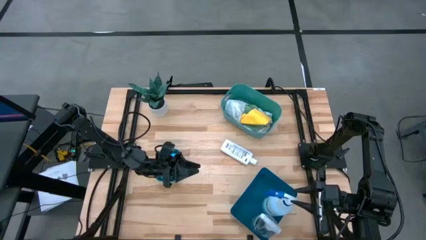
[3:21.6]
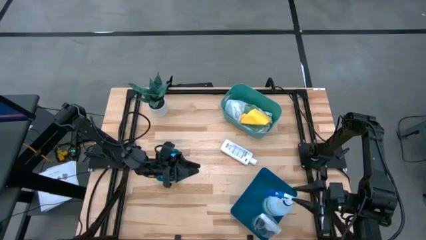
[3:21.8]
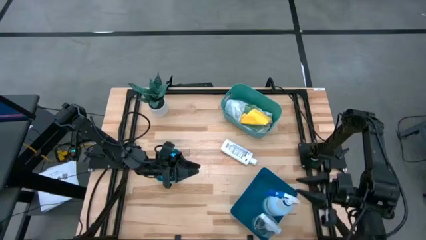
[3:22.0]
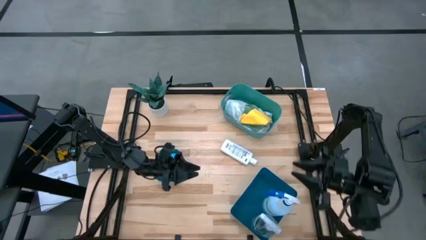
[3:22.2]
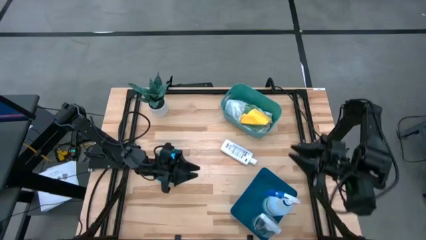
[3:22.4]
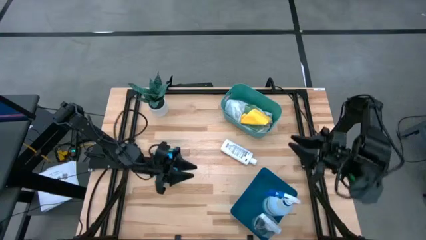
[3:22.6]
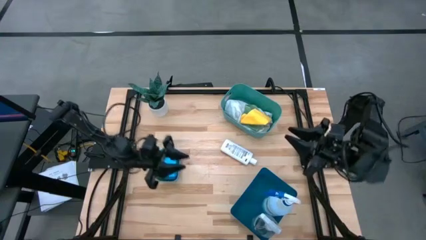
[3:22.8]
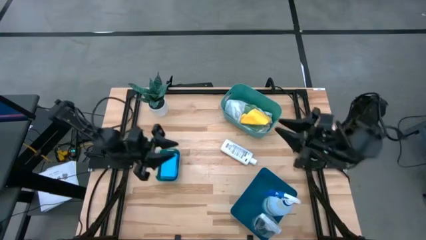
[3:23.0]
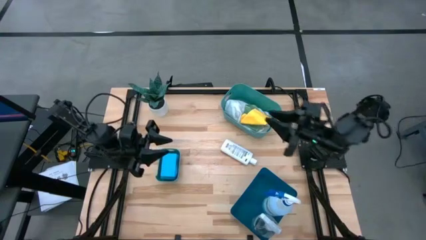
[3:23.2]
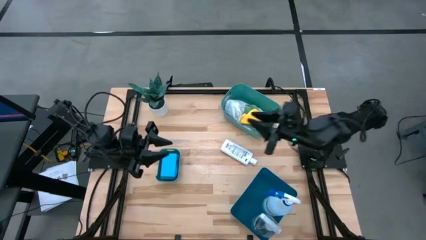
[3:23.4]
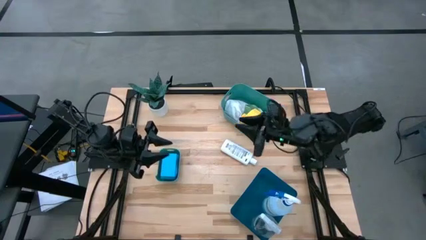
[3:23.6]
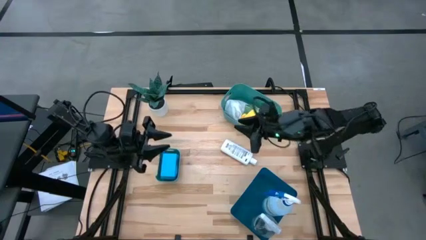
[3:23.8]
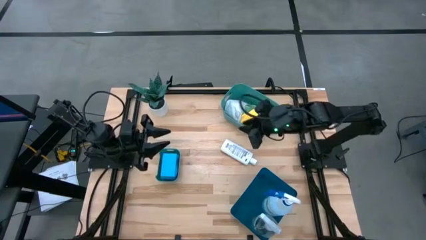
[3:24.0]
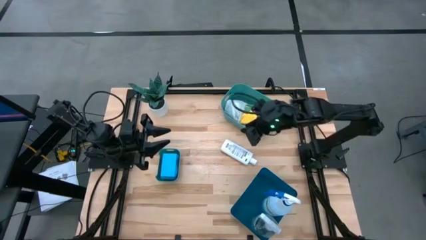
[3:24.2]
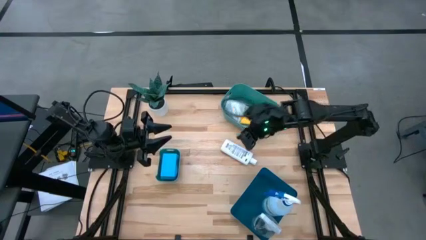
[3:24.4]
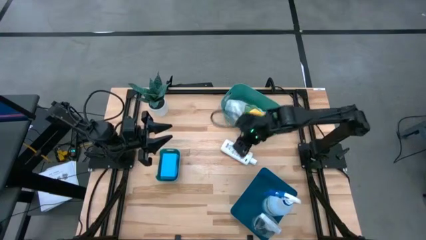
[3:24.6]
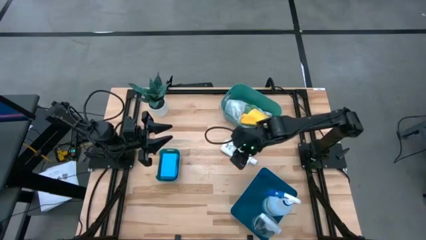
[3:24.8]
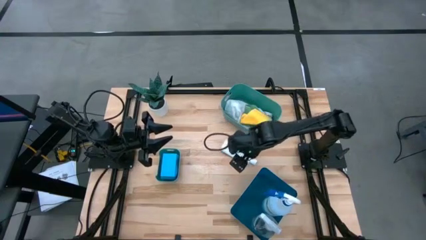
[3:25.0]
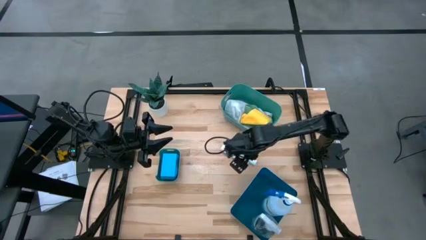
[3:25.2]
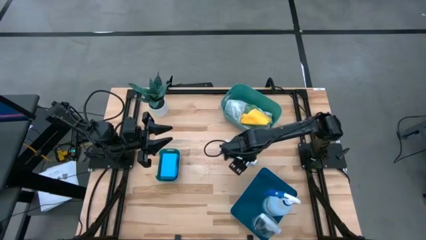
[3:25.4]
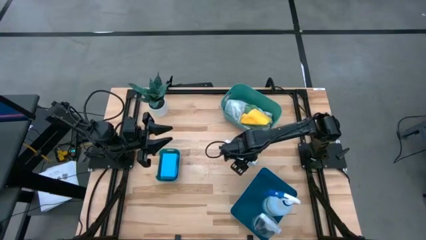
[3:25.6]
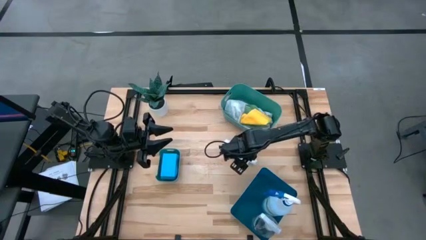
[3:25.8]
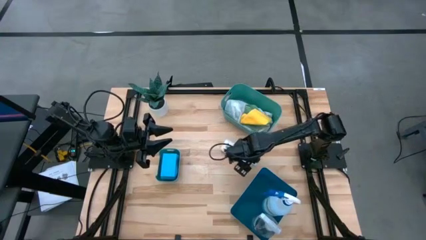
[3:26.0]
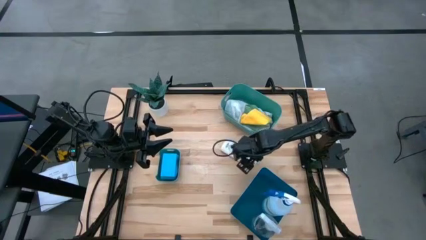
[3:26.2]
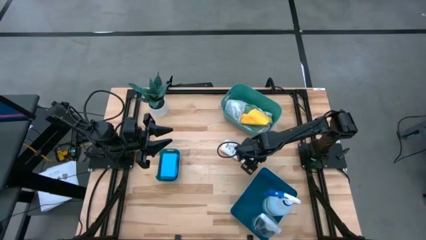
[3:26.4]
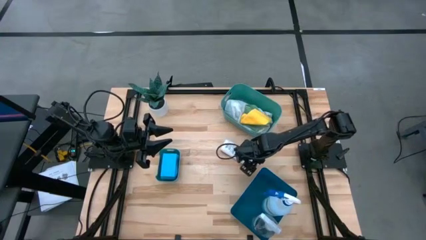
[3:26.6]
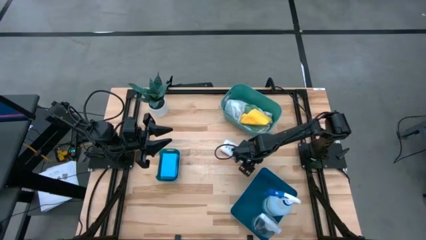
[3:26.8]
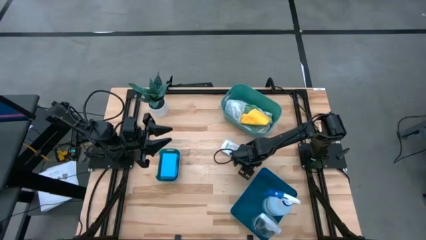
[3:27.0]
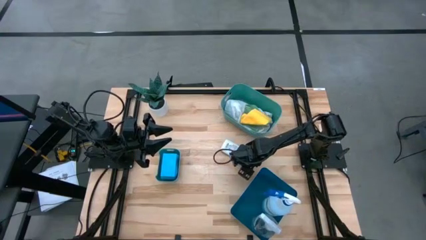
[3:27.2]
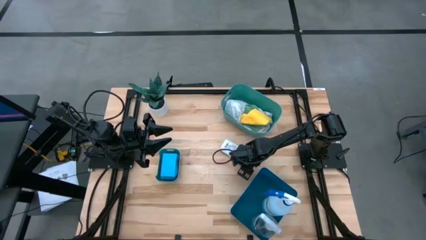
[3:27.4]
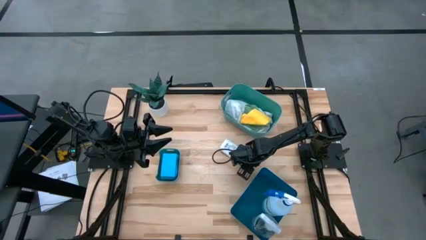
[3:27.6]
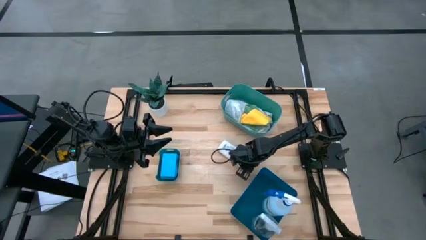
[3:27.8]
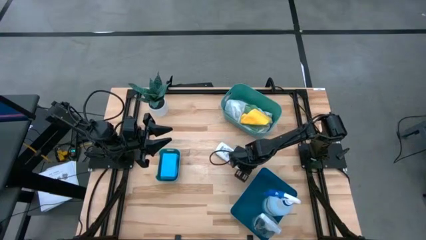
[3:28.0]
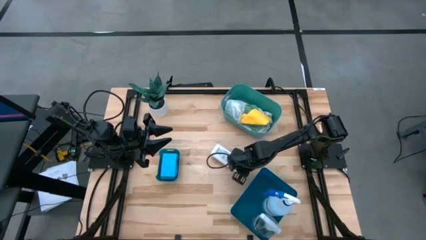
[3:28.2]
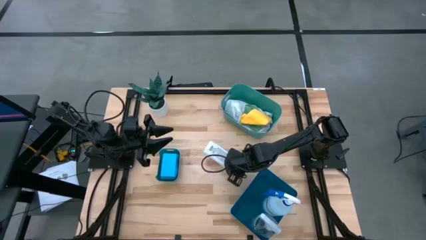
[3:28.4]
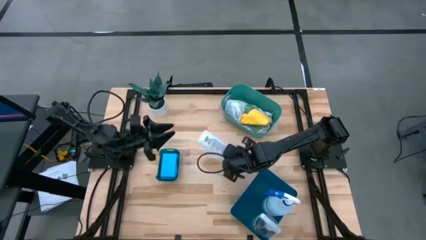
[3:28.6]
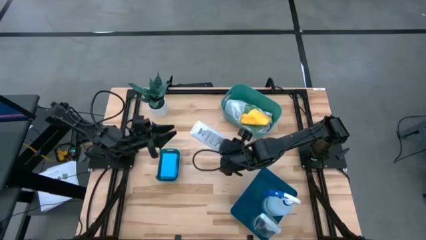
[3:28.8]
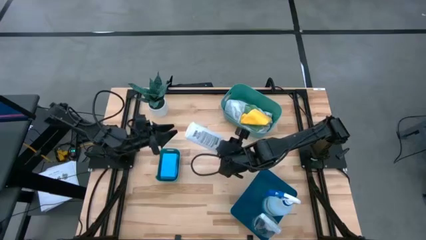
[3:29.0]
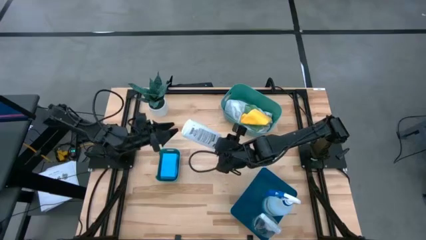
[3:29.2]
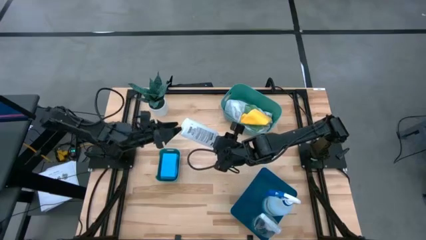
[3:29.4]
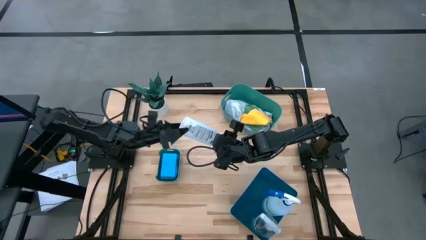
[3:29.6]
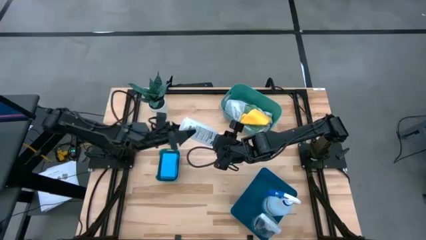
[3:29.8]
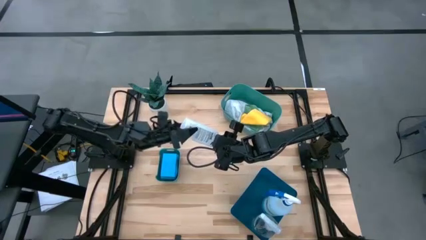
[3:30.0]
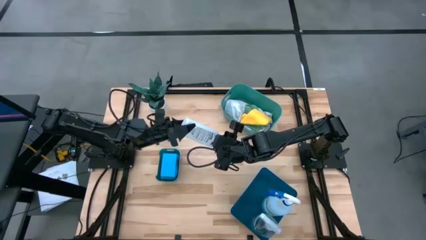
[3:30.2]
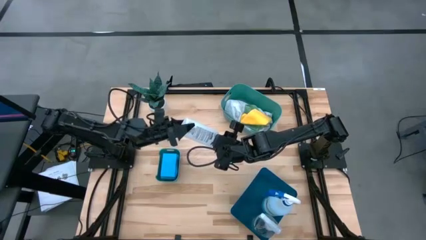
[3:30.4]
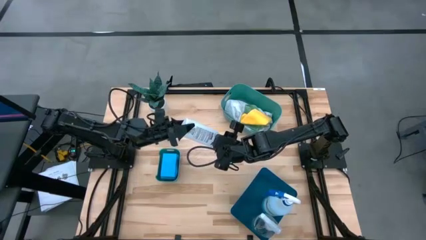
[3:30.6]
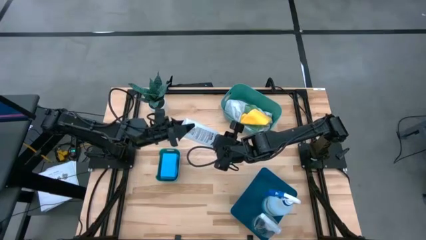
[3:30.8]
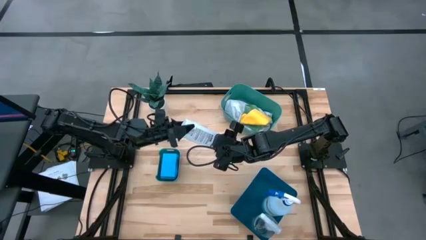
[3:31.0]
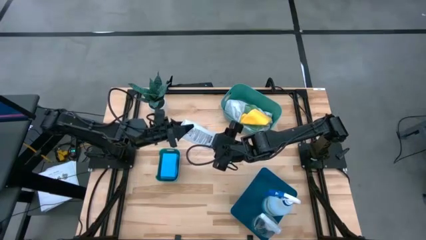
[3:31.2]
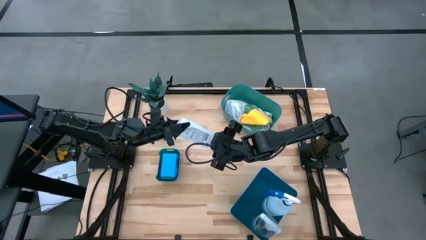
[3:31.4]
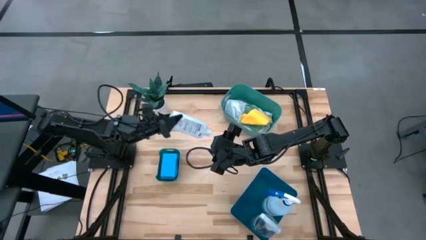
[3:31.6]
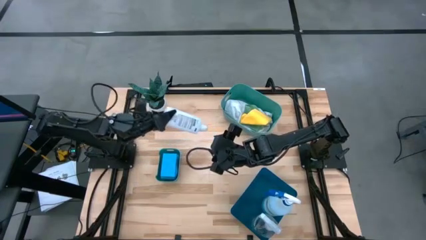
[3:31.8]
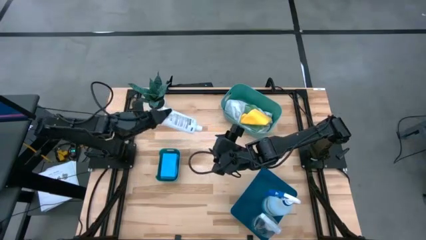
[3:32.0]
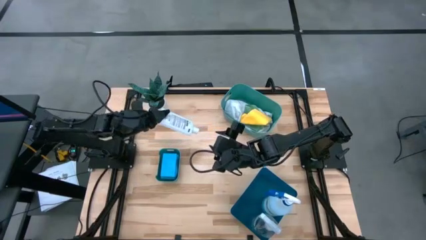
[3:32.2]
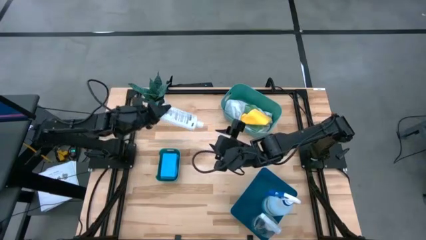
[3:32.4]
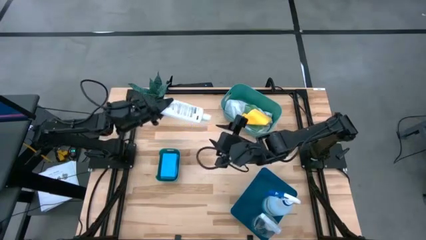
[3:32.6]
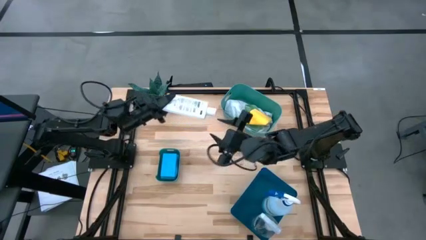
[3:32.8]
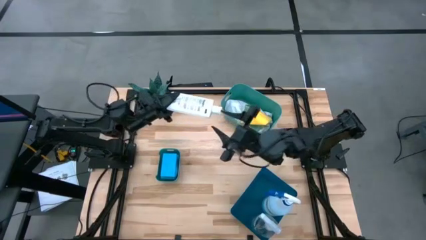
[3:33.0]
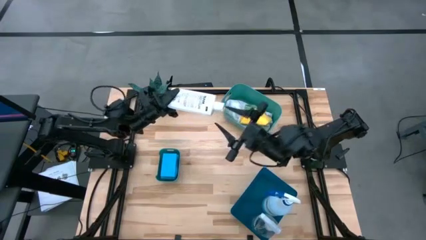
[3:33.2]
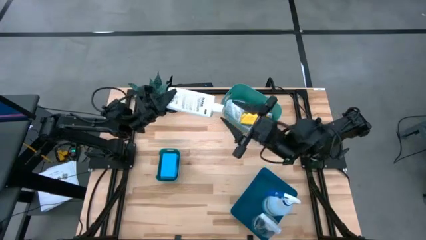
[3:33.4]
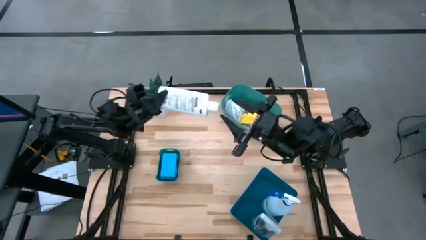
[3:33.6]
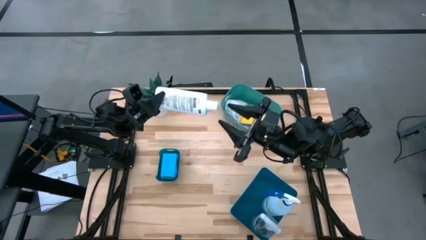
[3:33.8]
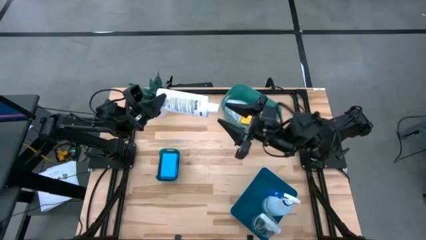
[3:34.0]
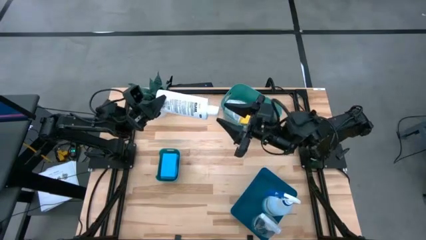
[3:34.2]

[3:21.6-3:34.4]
Task: Pick & Place Kitchen Items
Put the white glass cleaner bottle into the blue bin
